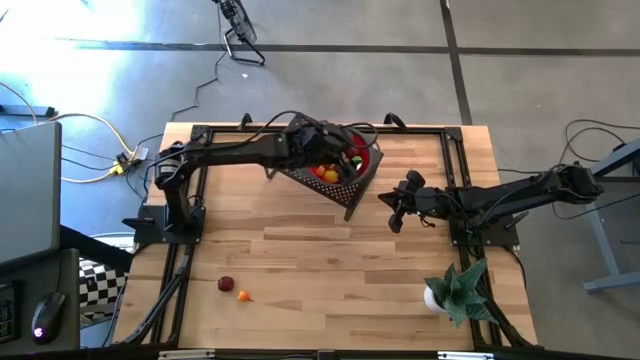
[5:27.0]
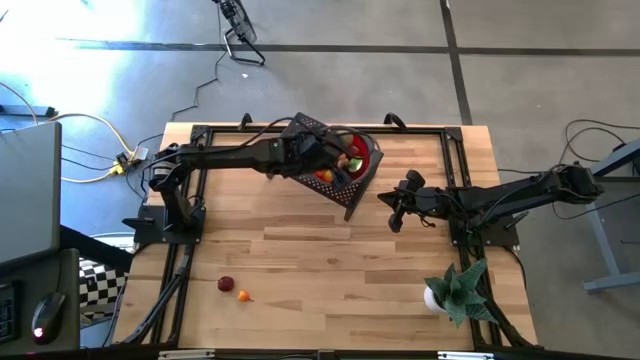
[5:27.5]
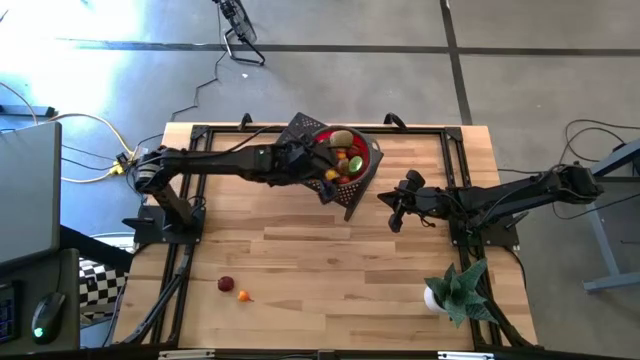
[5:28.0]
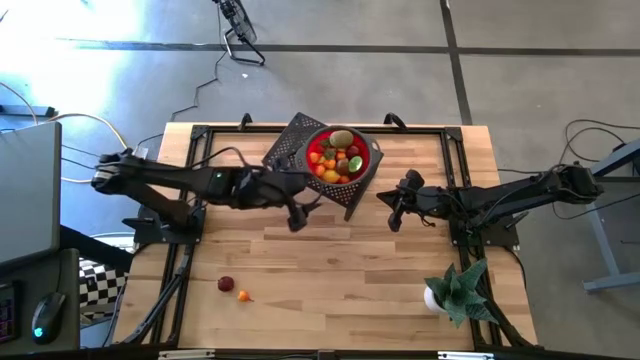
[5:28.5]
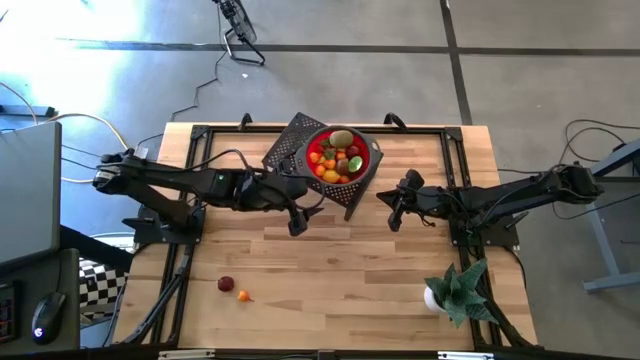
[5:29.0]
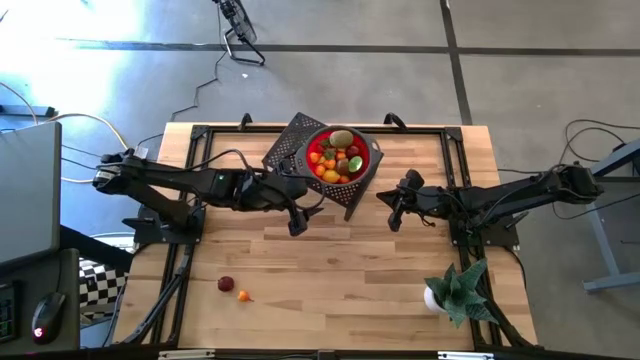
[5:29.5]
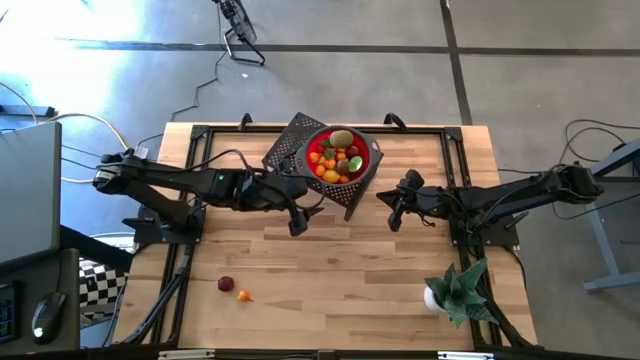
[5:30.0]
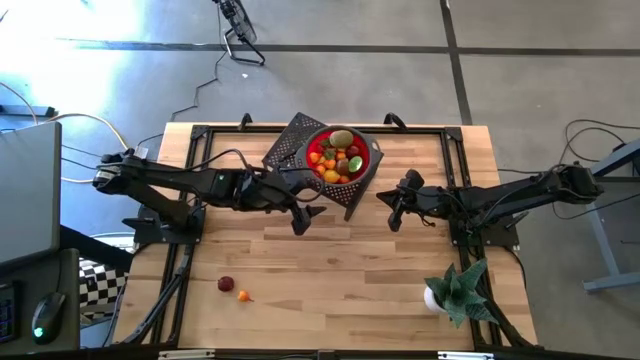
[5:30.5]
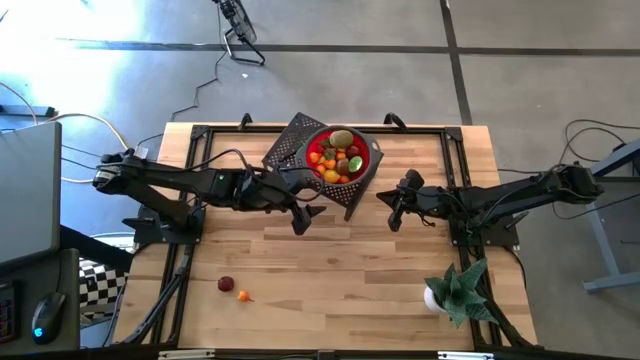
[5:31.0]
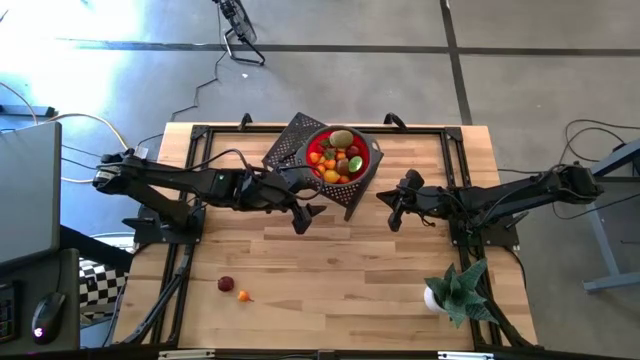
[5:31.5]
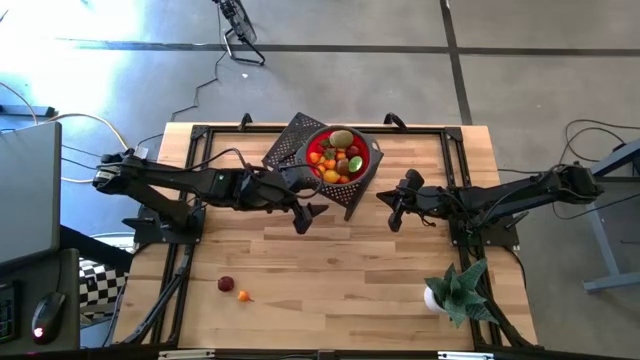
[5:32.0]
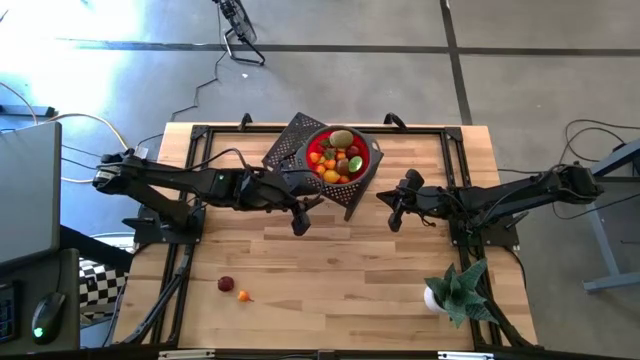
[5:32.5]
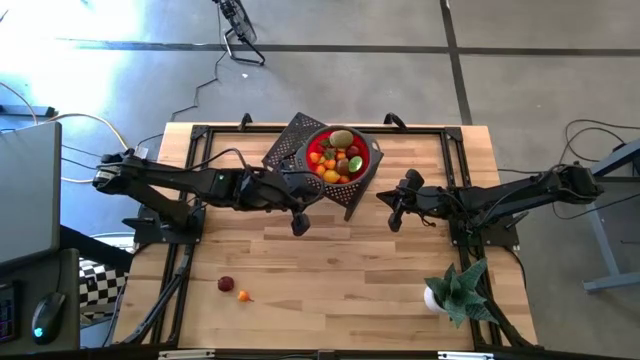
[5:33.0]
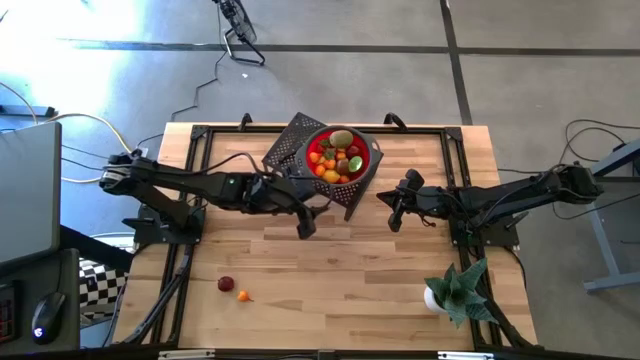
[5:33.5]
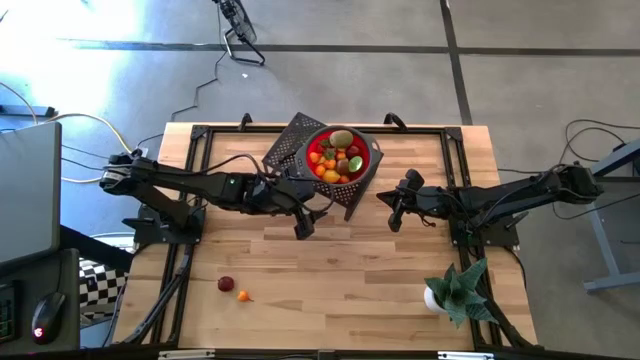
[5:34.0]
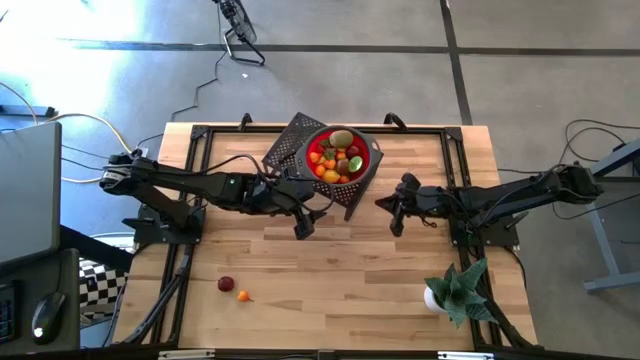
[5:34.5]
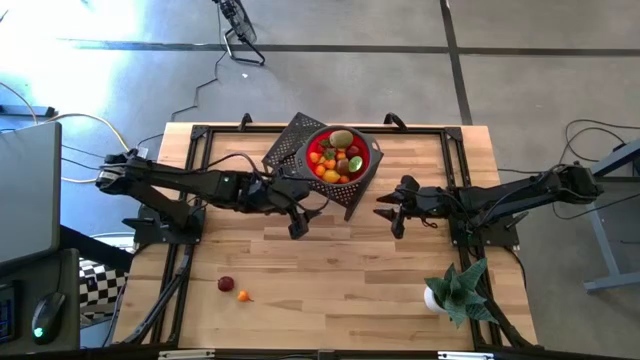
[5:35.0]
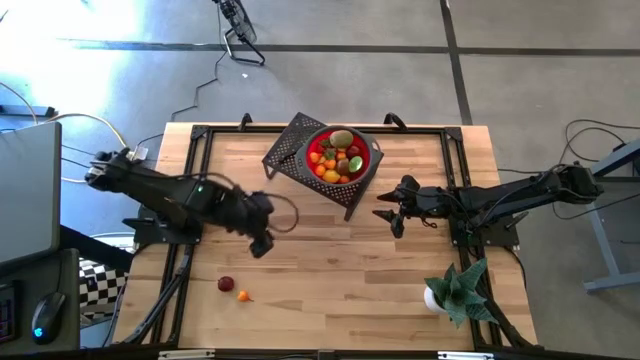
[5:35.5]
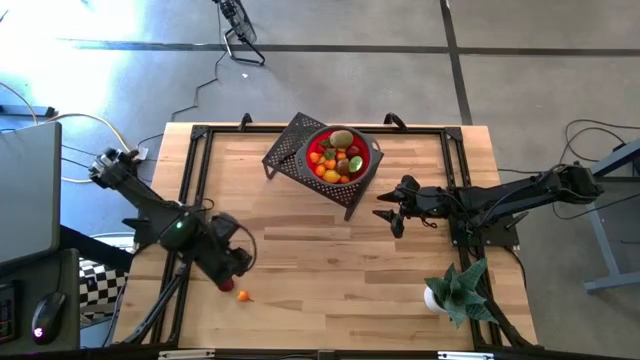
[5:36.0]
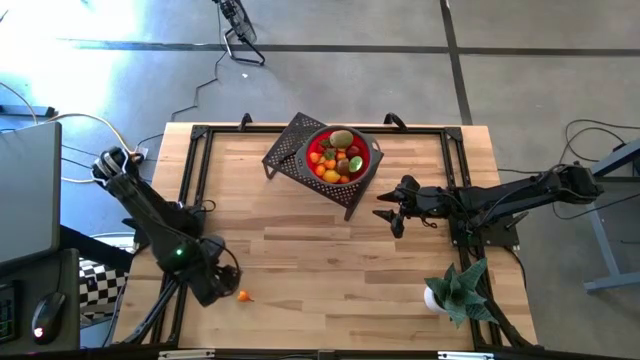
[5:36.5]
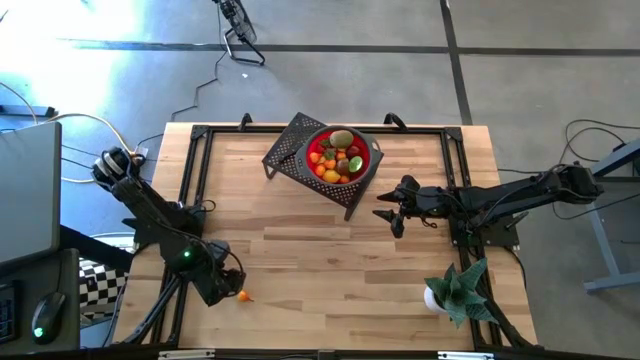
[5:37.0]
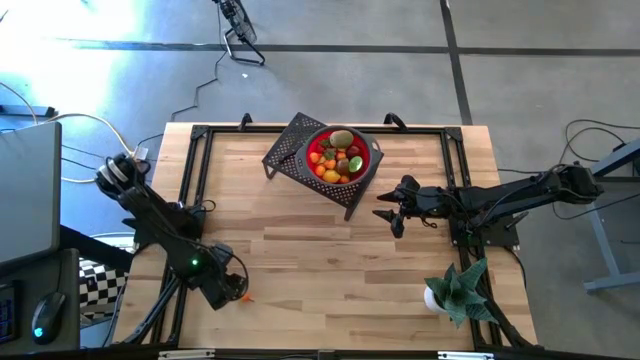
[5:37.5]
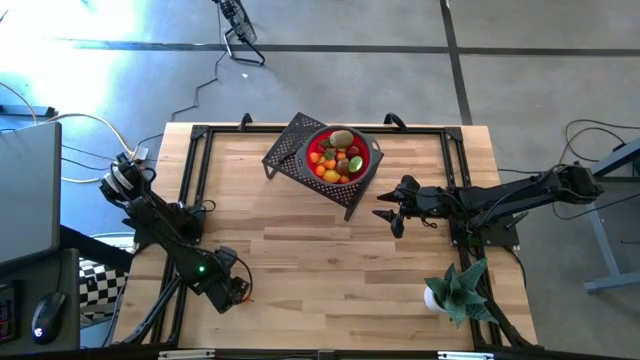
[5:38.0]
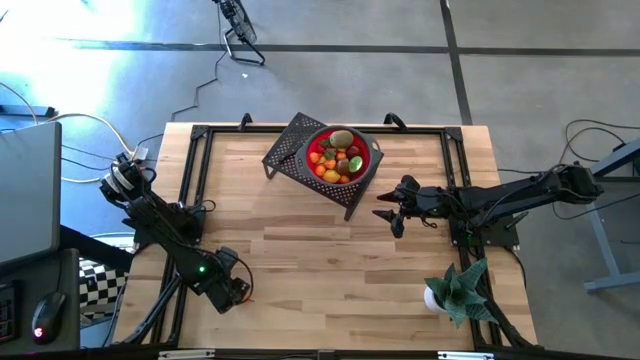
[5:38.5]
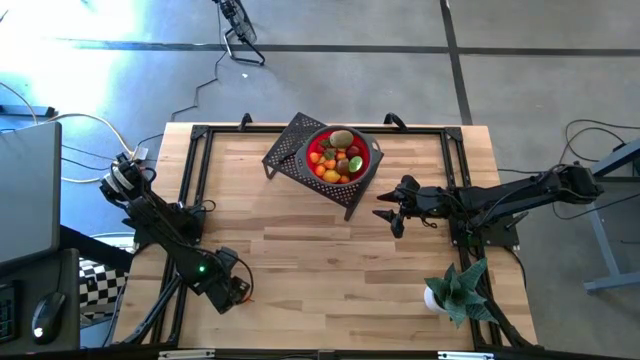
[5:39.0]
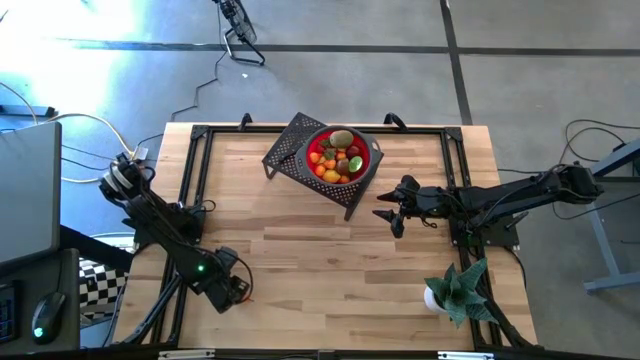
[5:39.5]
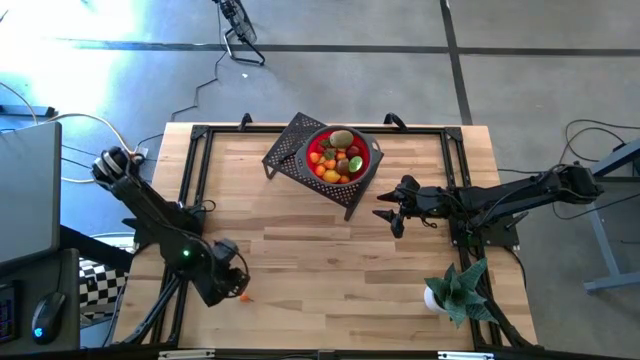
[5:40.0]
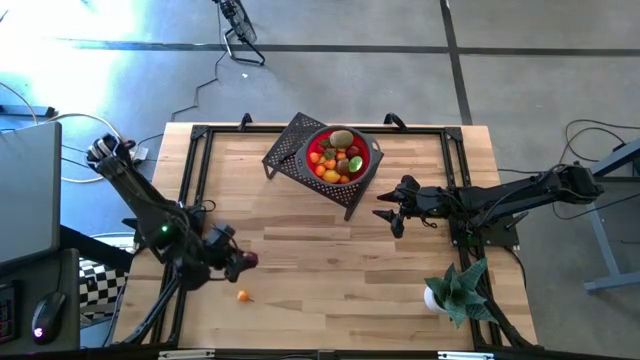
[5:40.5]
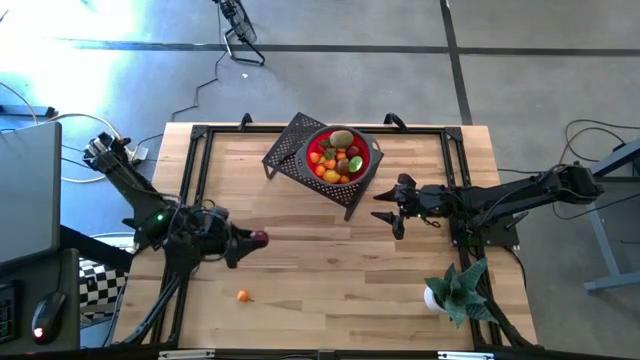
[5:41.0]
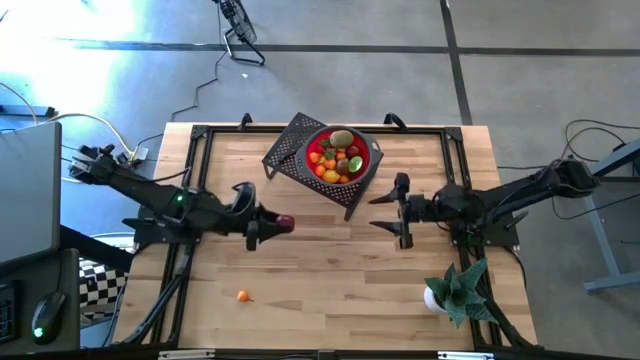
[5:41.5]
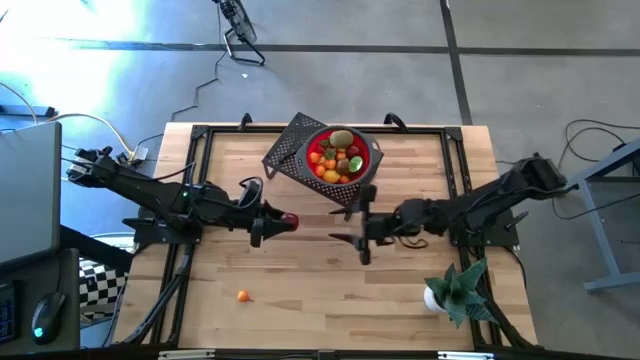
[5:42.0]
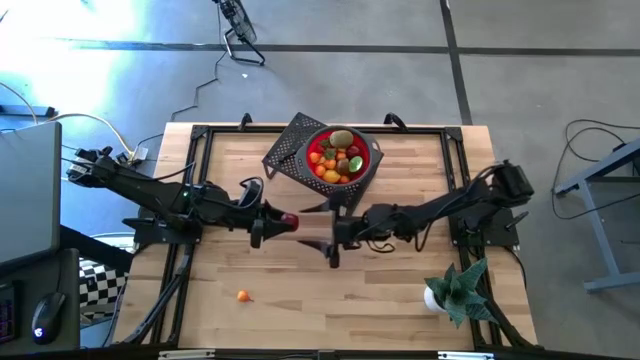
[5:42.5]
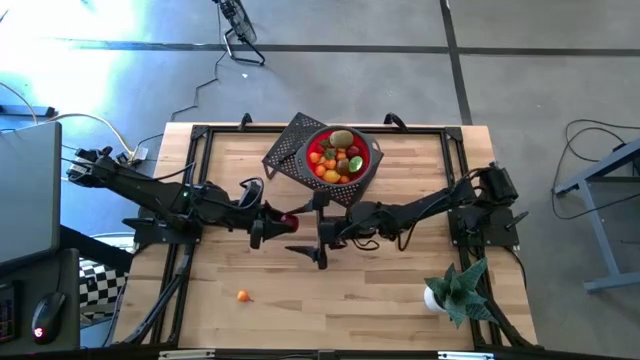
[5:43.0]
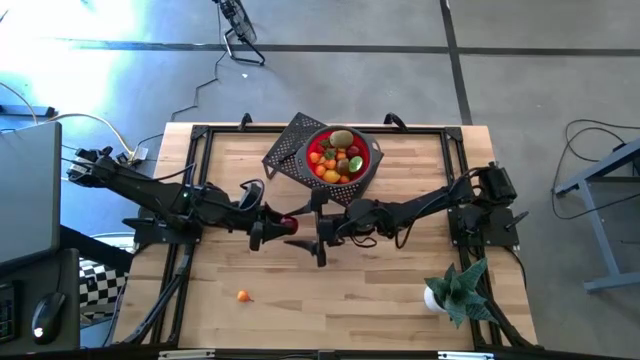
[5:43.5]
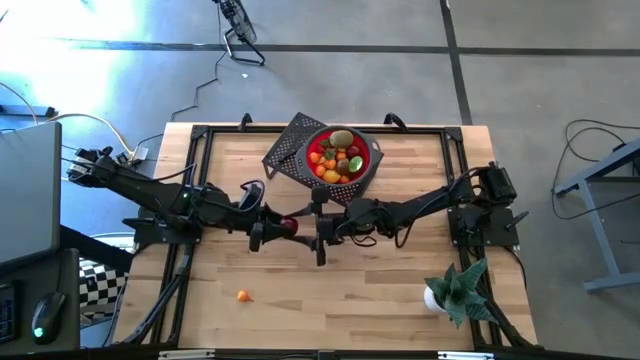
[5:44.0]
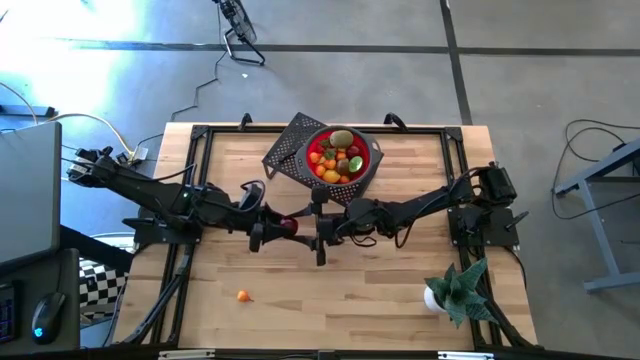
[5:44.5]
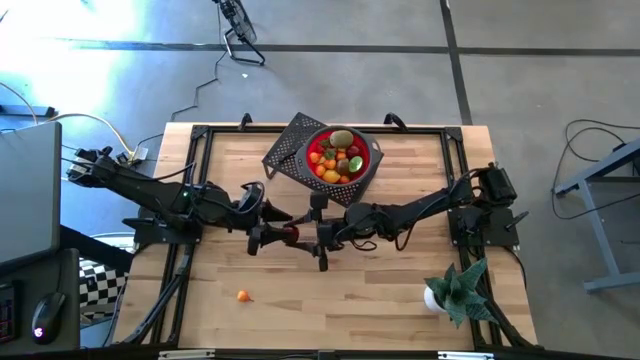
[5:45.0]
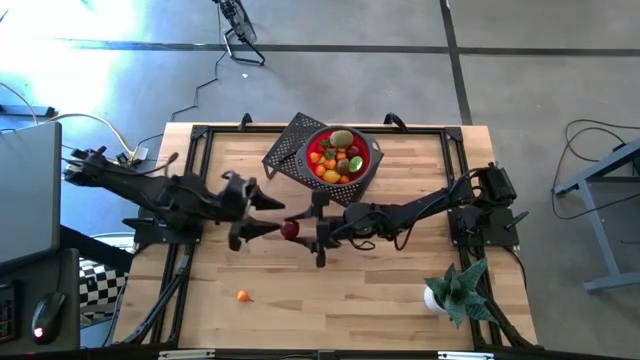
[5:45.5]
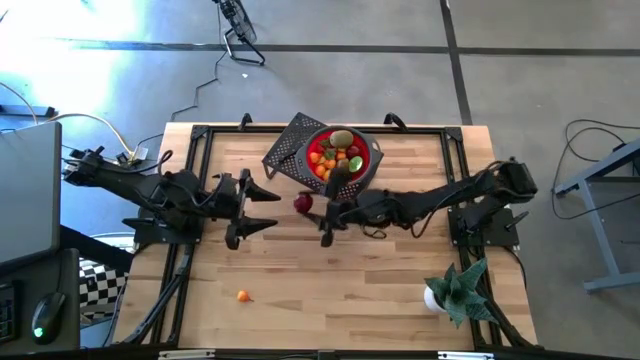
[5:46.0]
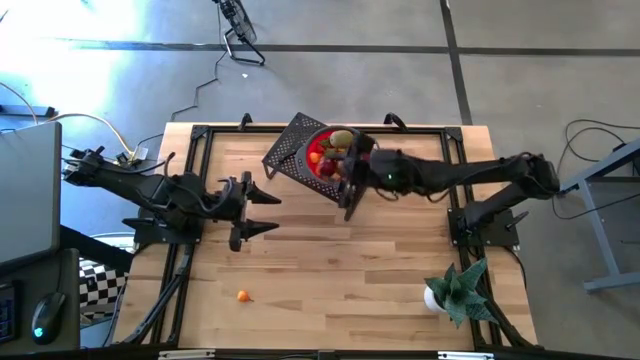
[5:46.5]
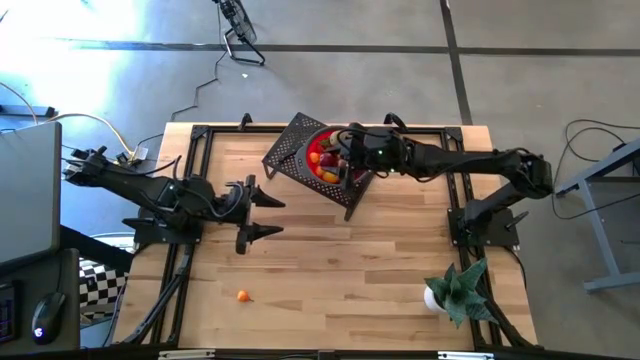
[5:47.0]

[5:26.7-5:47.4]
Task: Pick & Place Fruit
Put the pomegranate into the strainer bowl on the shelf
